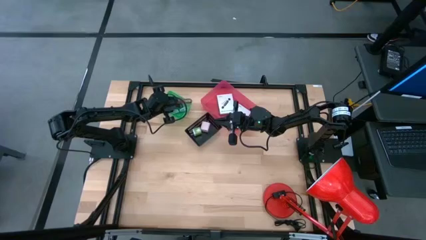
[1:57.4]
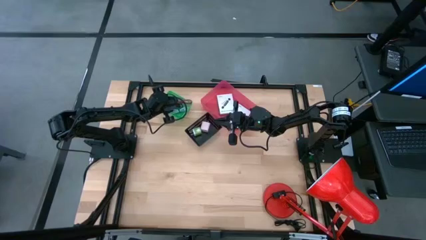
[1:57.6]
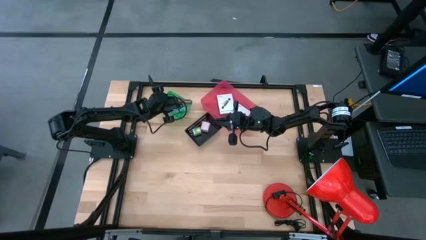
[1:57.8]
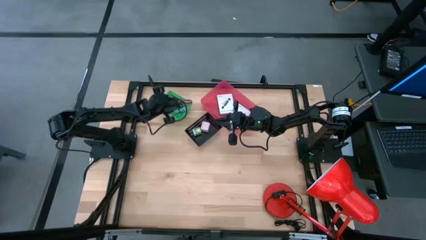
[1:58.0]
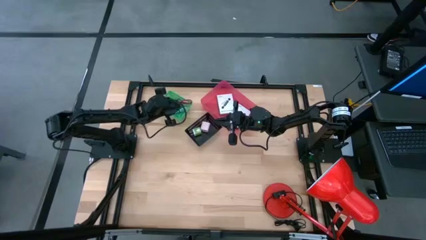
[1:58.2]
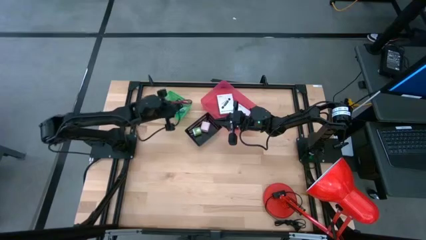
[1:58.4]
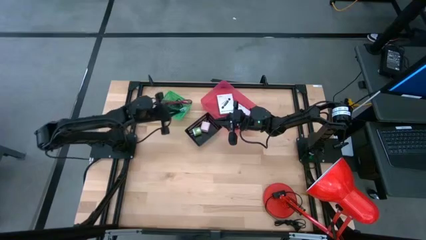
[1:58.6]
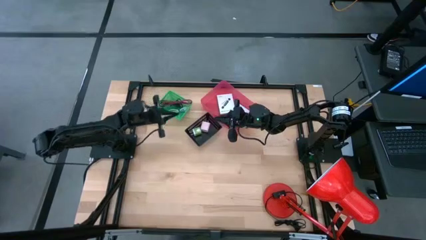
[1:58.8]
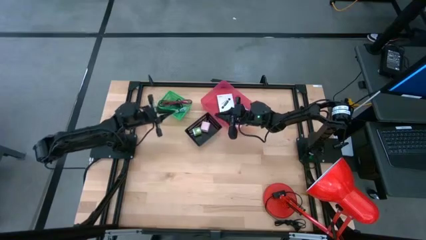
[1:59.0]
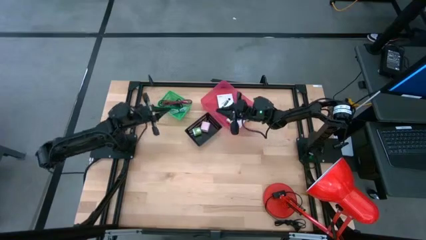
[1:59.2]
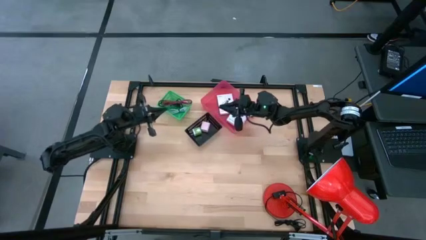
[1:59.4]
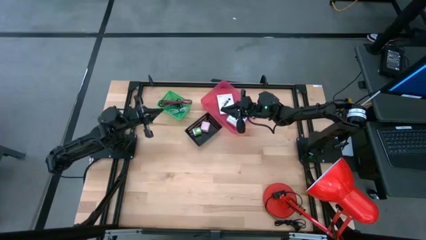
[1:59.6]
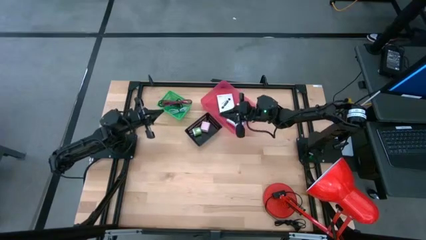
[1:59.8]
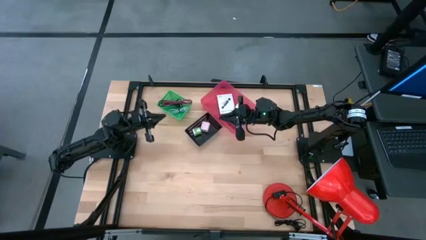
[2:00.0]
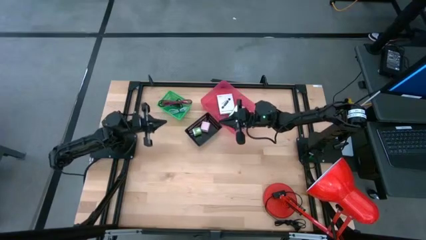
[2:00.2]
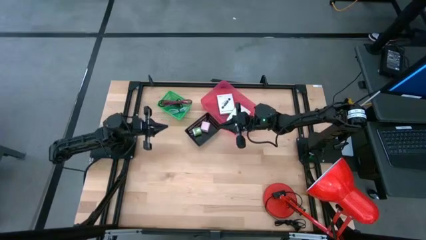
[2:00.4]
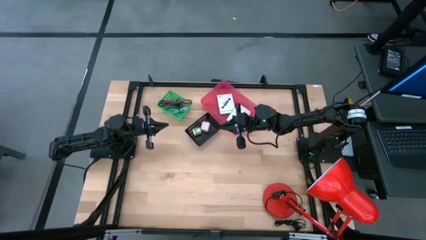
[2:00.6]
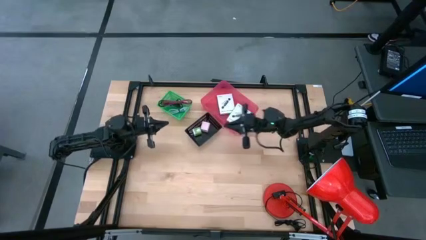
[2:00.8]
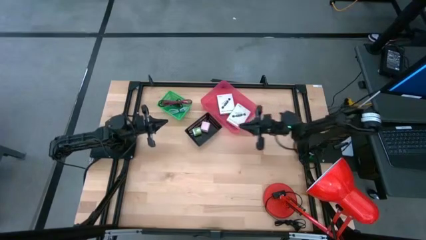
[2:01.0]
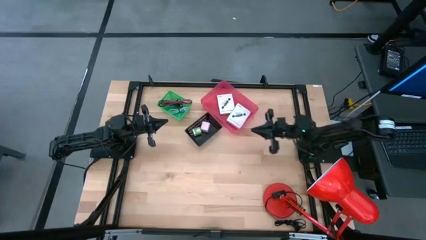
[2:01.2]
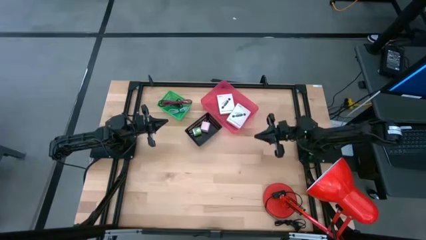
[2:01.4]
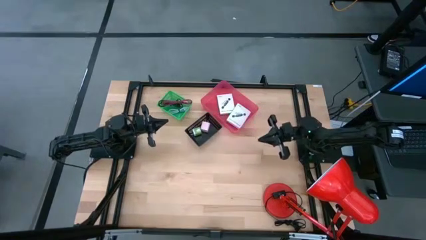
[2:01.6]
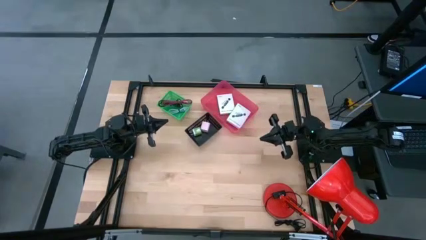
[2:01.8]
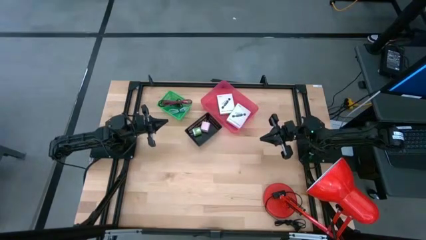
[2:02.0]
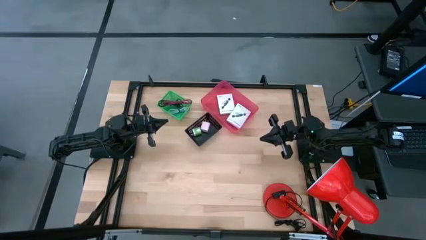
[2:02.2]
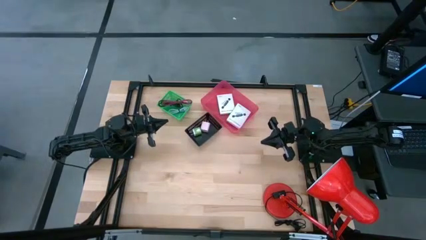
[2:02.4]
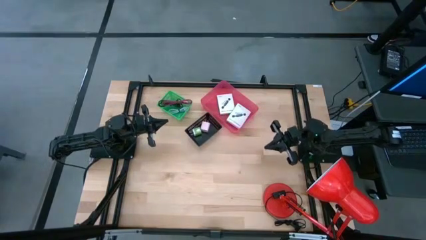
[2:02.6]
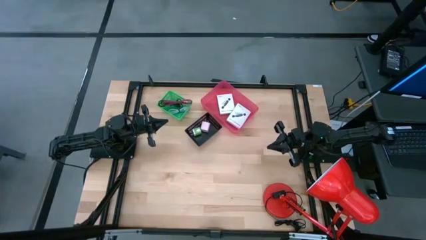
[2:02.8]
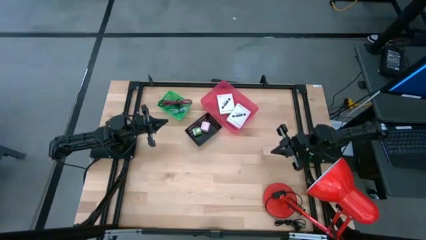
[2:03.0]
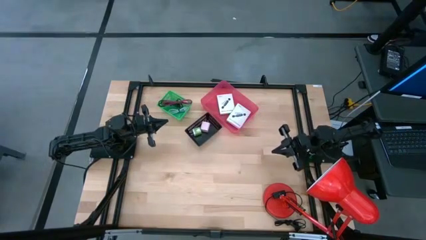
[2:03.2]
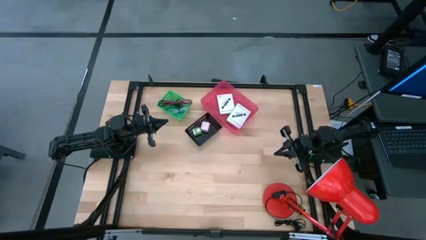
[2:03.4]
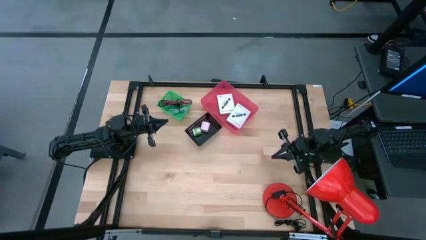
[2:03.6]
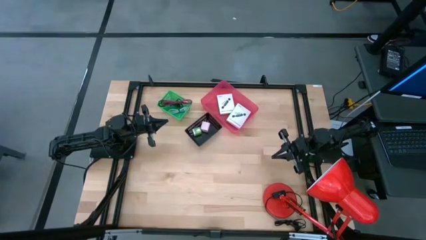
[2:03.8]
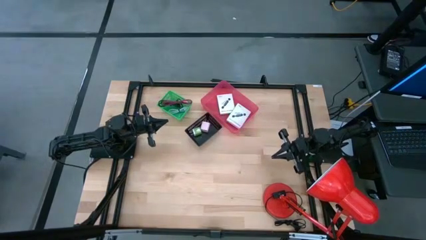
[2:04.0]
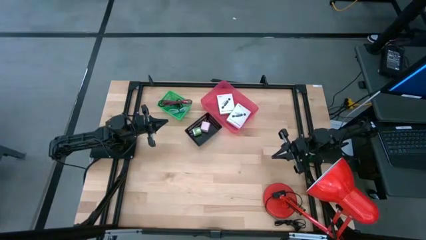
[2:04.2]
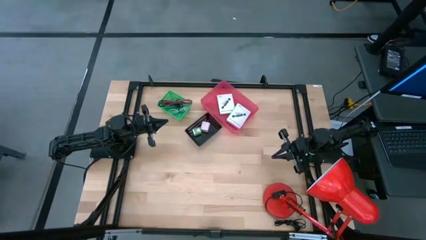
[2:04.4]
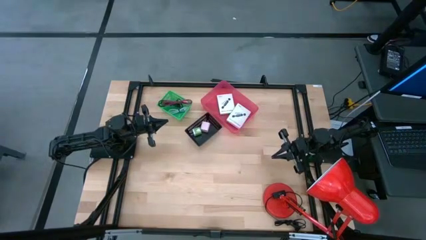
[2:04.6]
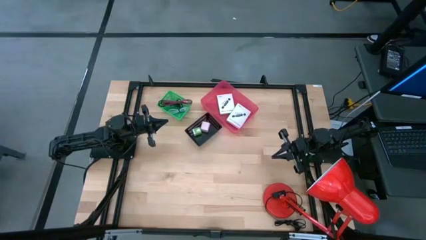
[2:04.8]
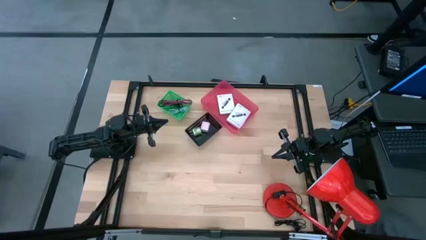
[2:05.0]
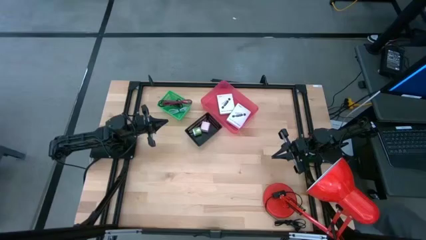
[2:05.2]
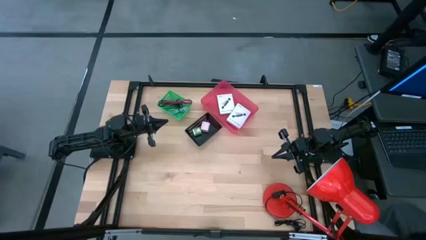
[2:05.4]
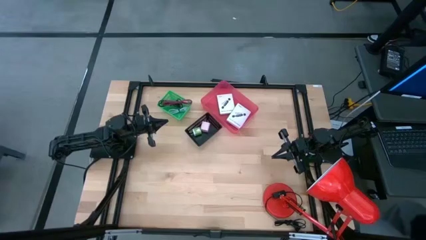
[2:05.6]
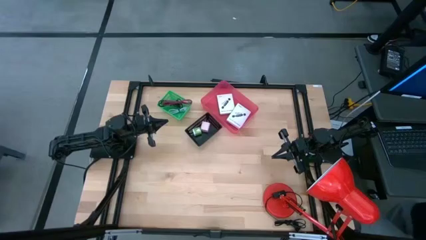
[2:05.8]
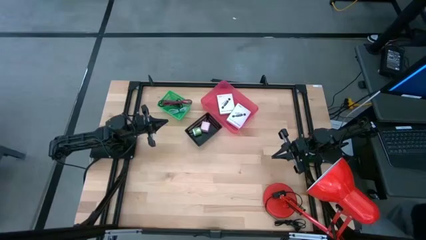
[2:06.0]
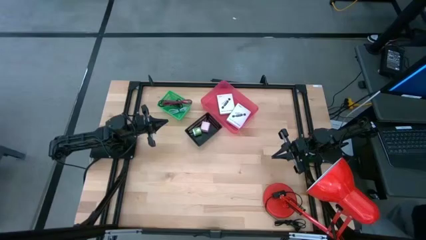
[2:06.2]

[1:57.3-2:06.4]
Task: Pick and place items into bin
Return to Home Position

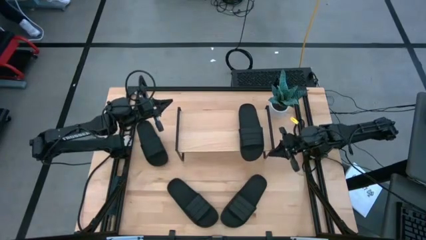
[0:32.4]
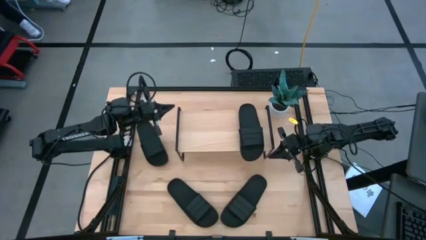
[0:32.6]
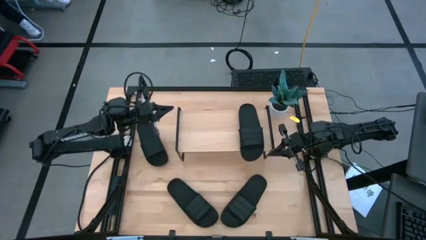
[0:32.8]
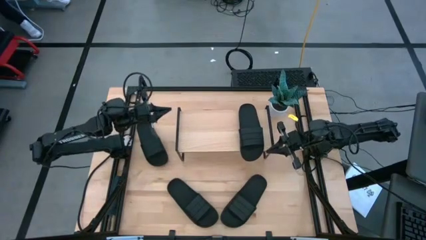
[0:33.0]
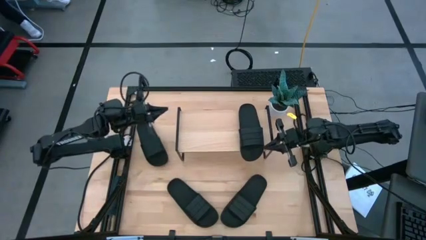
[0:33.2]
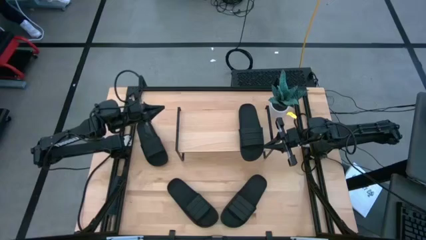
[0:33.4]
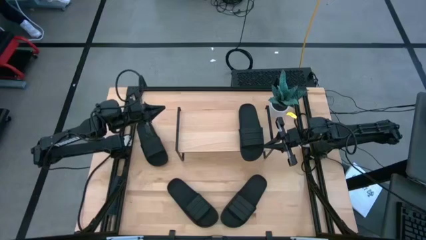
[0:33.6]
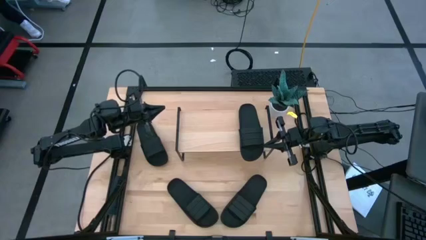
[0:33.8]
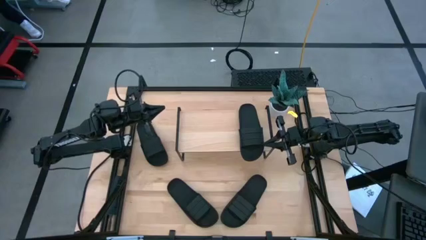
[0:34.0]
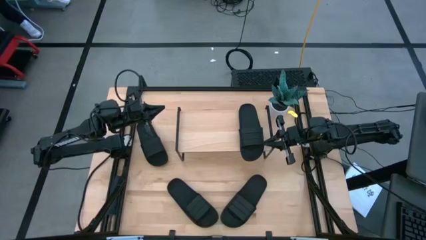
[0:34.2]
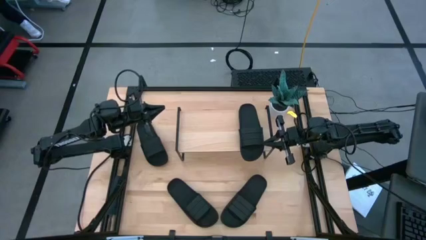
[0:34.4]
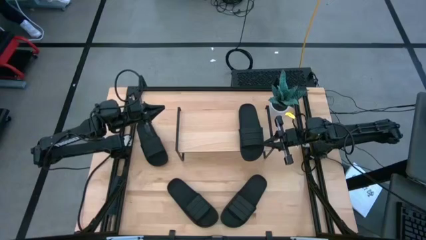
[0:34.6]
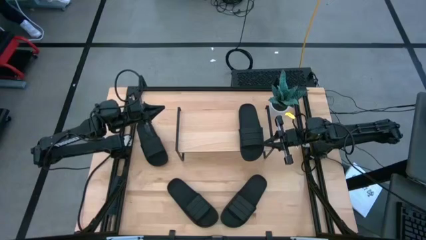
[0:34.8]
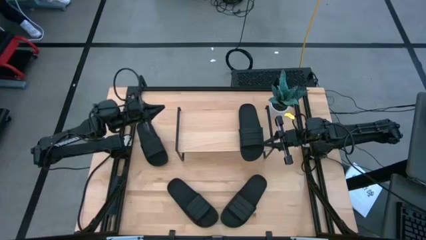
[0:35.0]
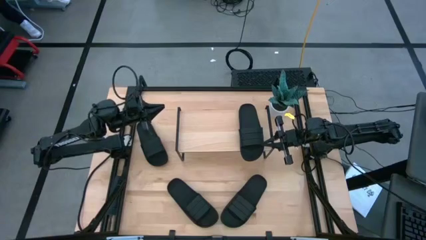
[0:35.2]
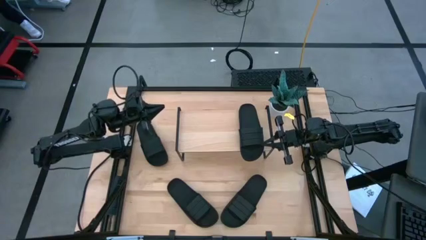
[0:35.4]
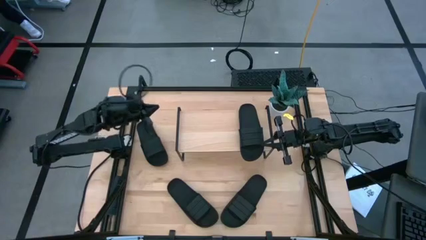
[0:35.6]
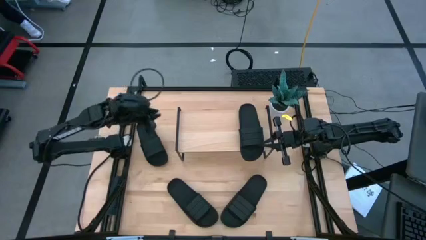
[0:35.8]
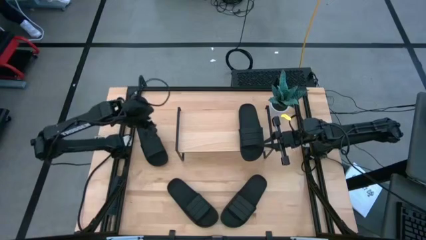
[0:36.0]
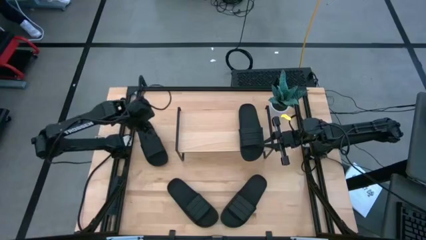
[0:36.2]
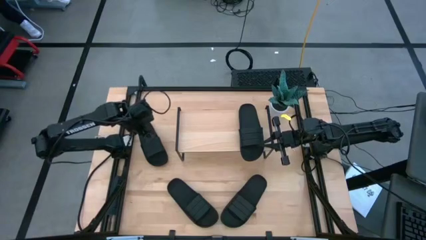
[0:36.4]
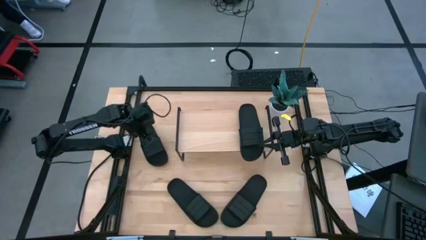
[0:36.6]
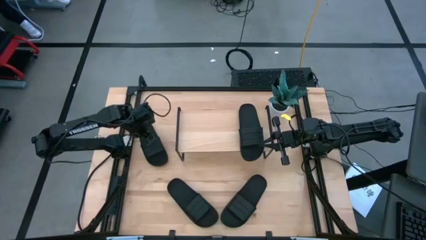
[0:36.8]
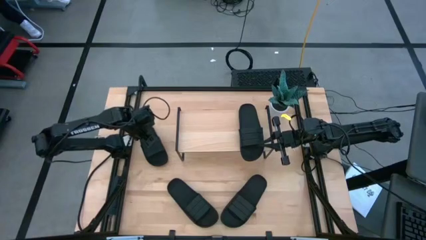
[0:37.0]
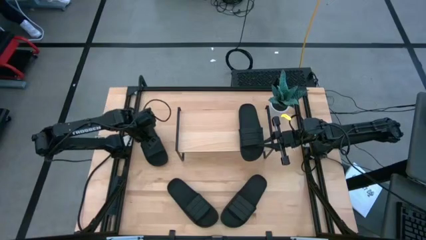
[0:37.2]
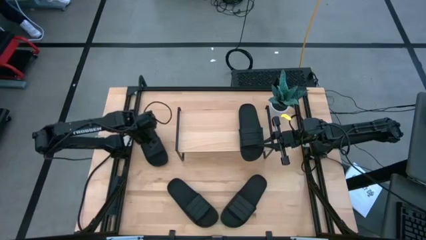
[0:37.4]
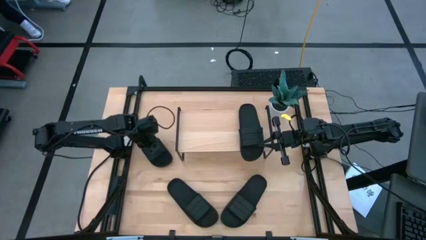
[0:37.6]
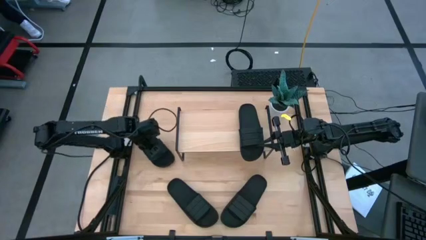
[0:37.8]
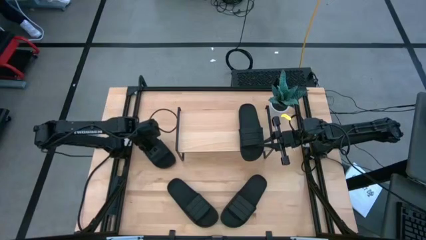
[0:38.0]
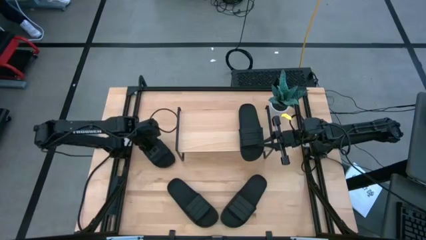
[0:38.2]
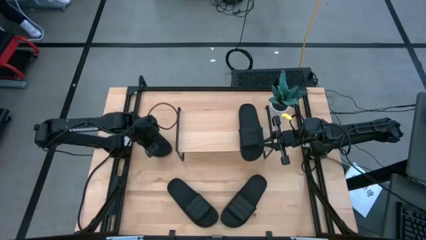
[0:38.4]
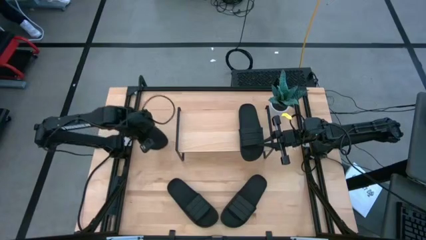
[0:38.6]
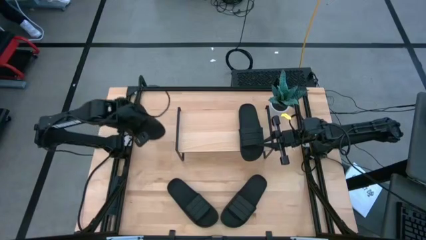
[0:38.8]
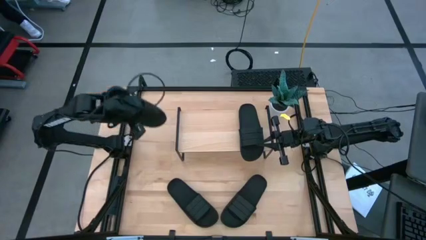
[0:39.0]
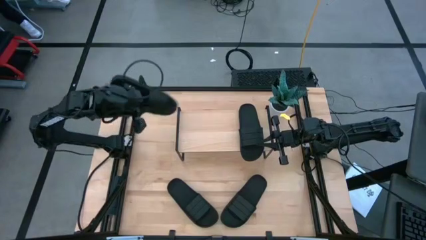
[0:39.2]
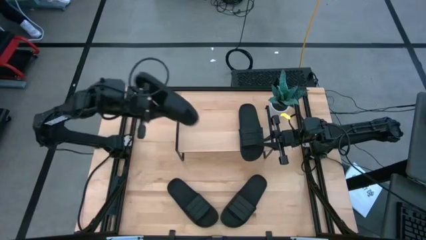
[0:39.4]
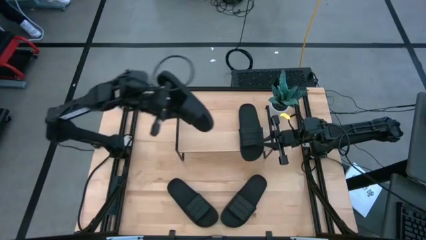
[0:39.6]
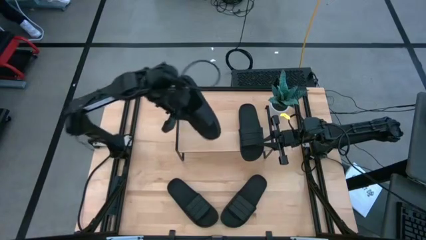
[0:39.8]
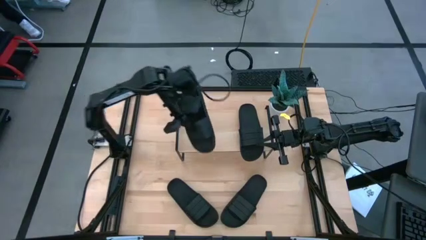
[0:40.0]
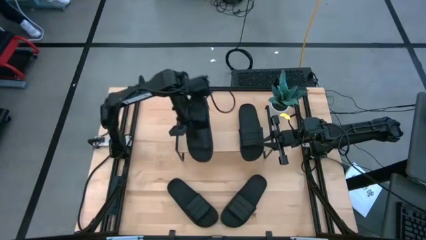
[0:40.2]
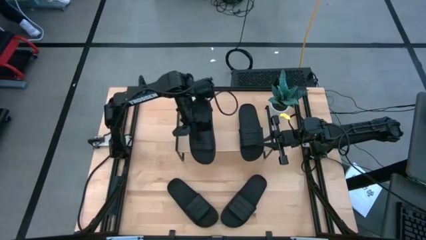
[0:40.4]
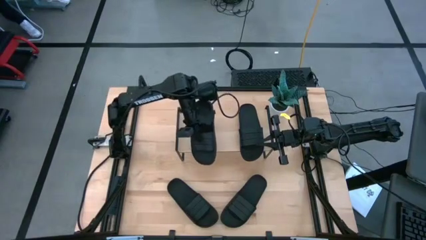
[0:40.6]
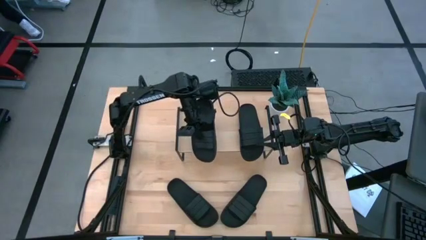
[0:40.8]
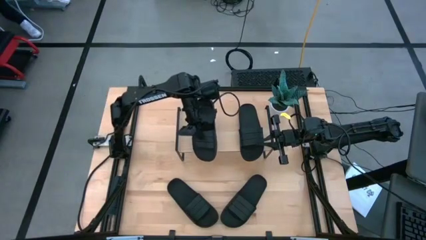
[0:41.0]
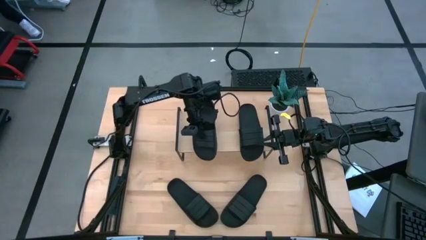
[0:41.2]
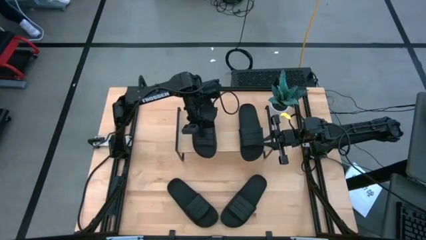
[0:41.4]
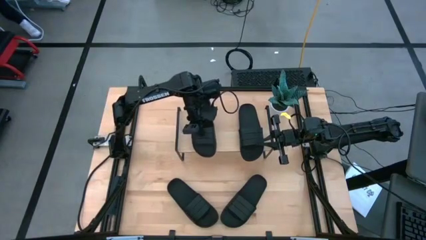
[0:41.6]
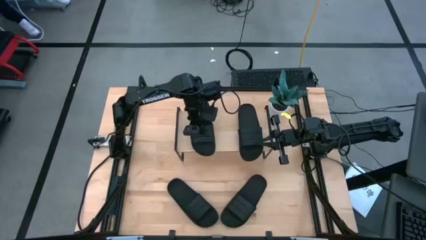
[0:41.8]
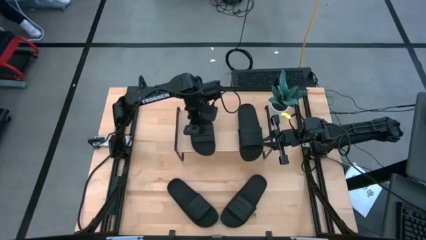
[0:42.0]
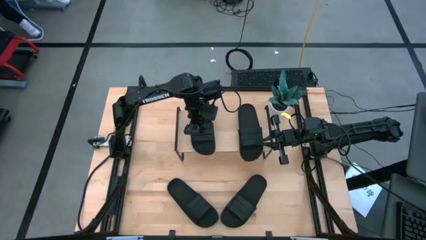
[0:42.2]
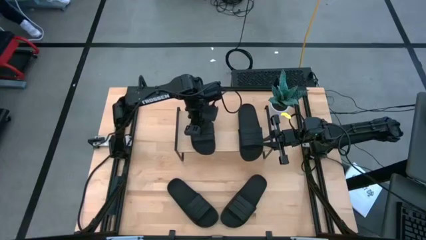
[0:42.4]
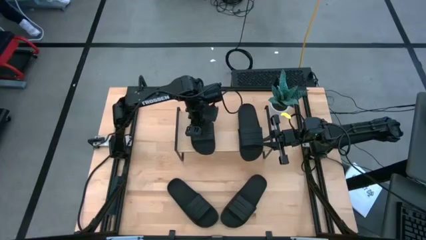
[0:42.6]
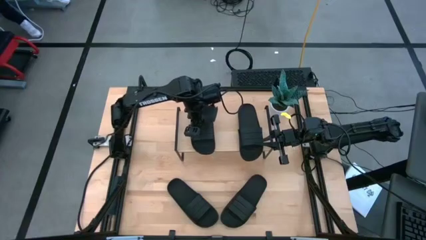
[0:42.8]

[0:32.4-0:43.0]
Task: Pick and place slides into the shelf
Put the top black slide on the shelf
